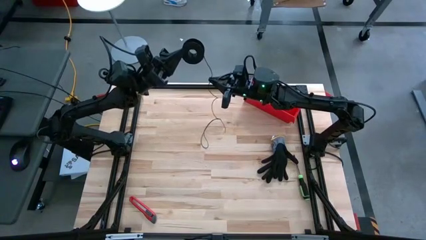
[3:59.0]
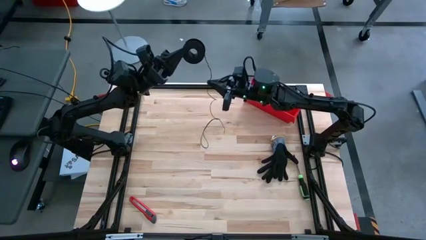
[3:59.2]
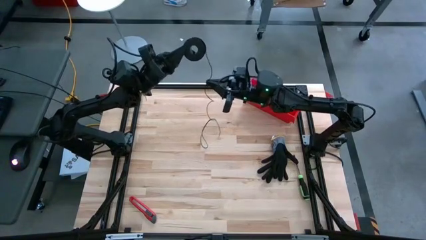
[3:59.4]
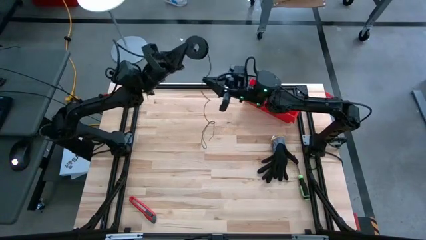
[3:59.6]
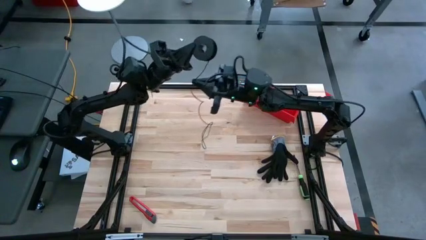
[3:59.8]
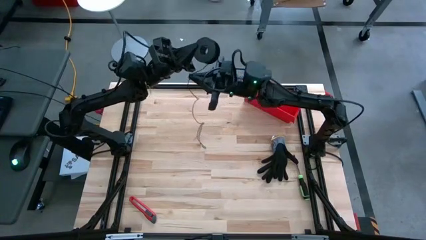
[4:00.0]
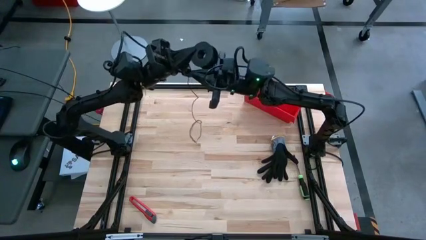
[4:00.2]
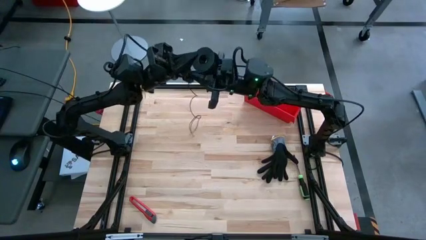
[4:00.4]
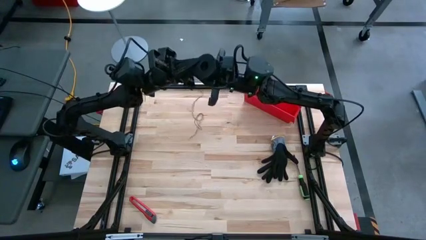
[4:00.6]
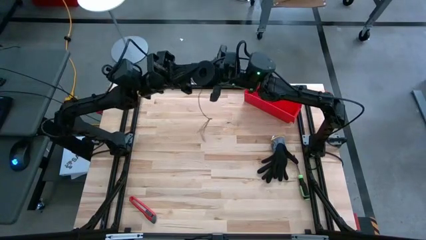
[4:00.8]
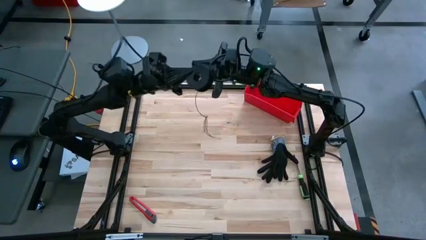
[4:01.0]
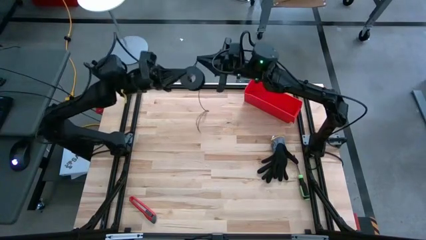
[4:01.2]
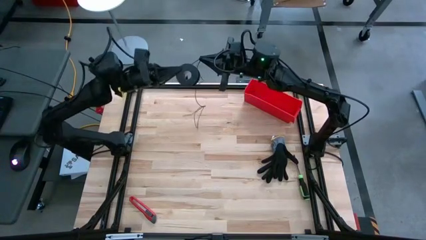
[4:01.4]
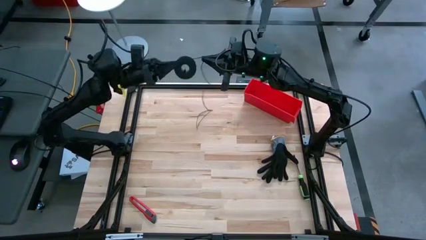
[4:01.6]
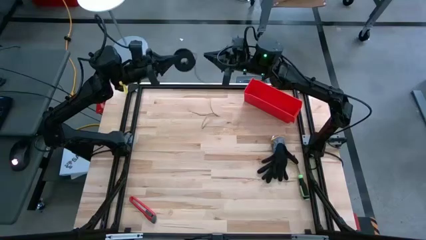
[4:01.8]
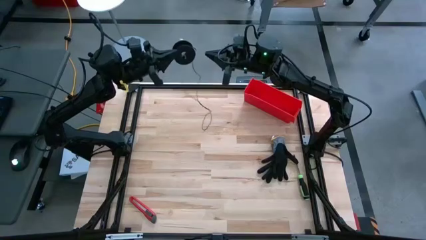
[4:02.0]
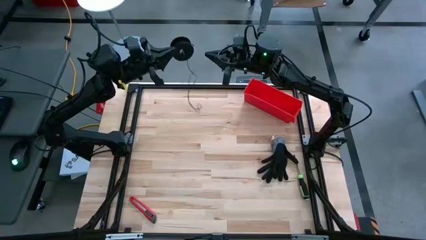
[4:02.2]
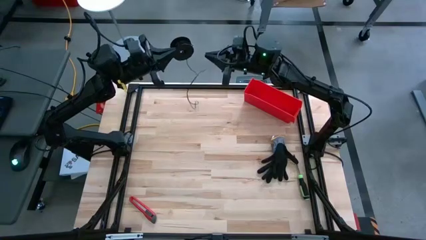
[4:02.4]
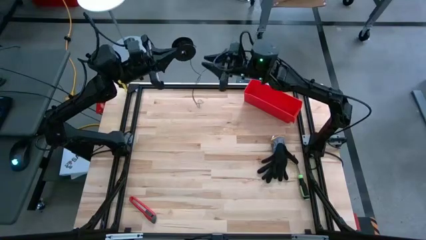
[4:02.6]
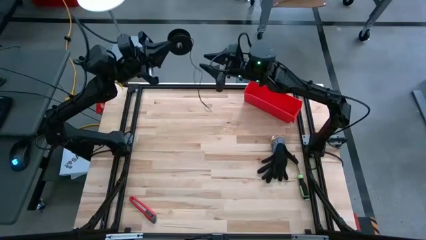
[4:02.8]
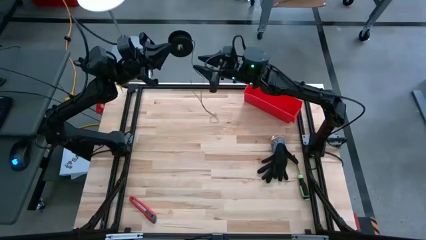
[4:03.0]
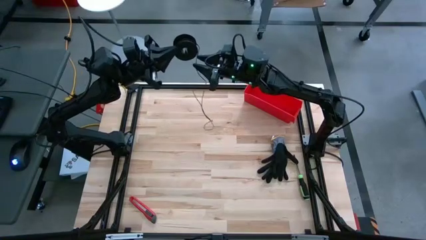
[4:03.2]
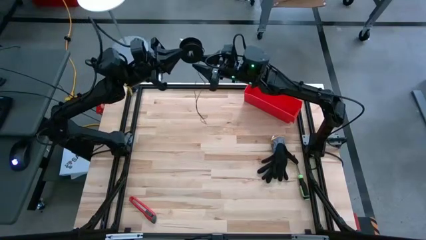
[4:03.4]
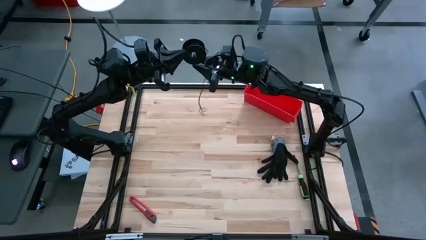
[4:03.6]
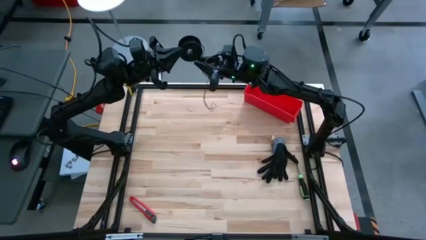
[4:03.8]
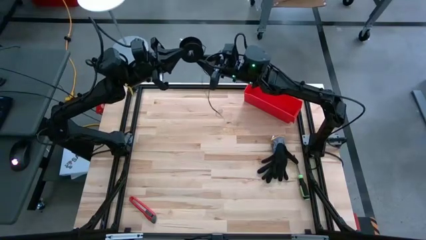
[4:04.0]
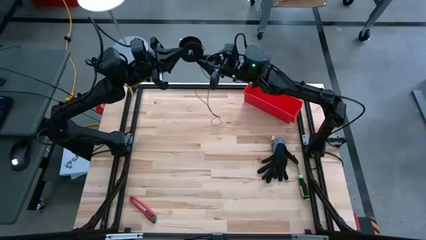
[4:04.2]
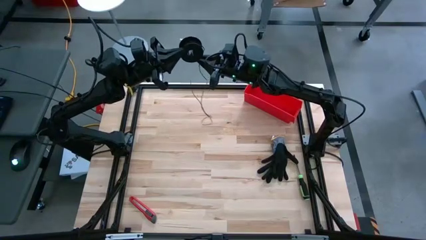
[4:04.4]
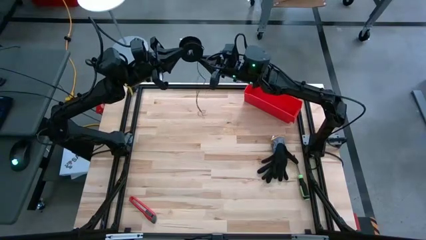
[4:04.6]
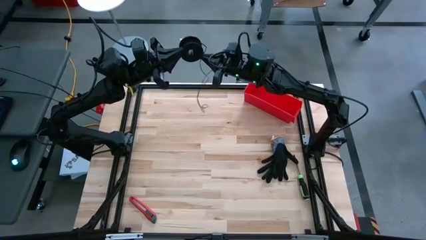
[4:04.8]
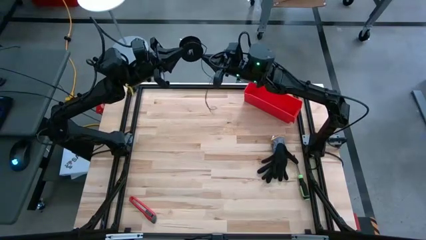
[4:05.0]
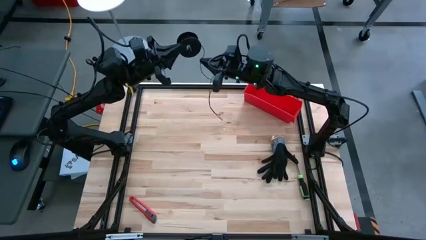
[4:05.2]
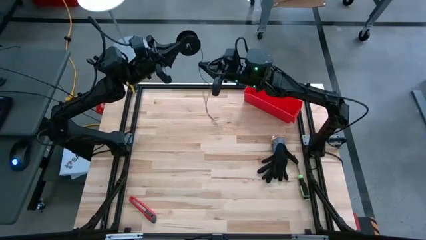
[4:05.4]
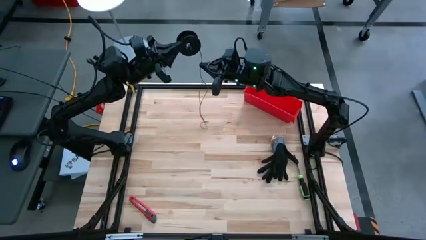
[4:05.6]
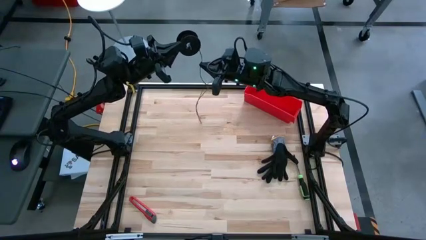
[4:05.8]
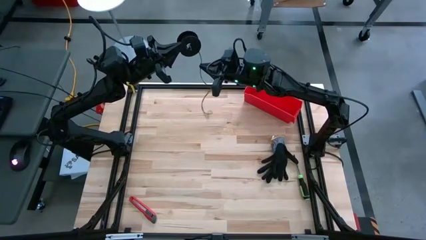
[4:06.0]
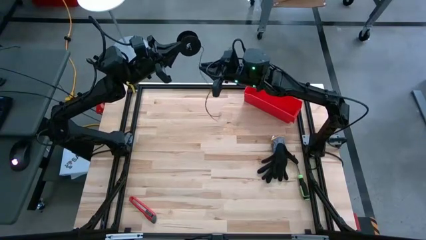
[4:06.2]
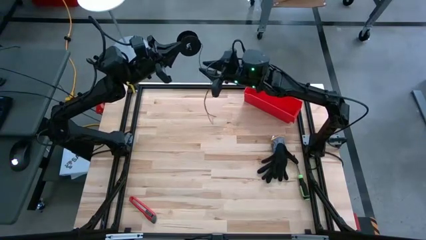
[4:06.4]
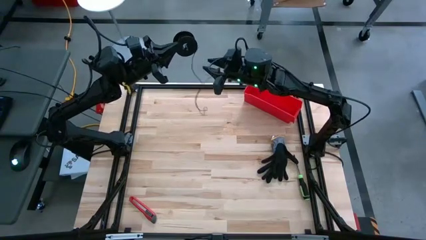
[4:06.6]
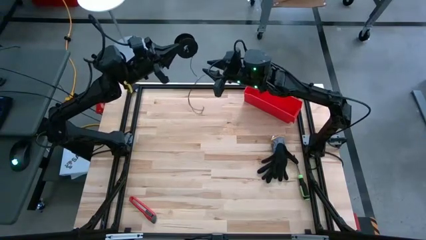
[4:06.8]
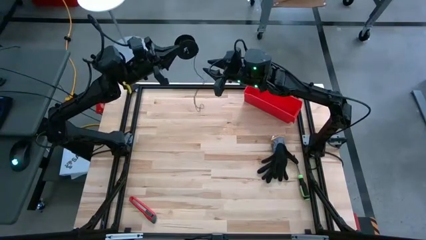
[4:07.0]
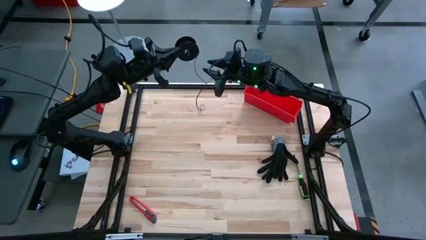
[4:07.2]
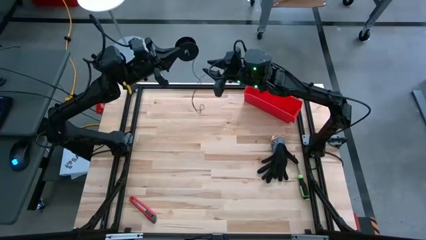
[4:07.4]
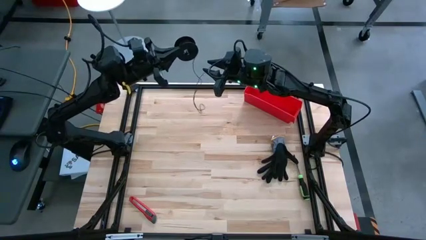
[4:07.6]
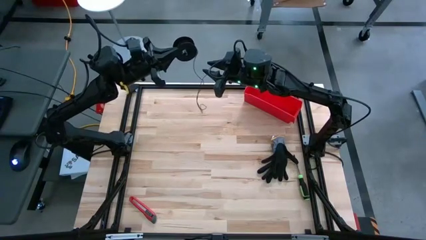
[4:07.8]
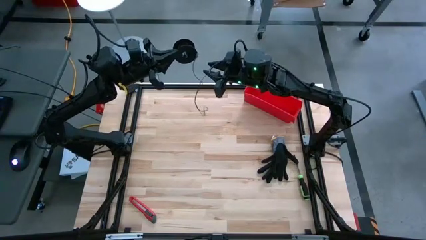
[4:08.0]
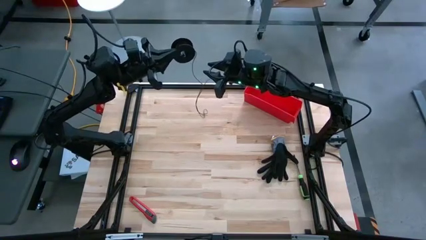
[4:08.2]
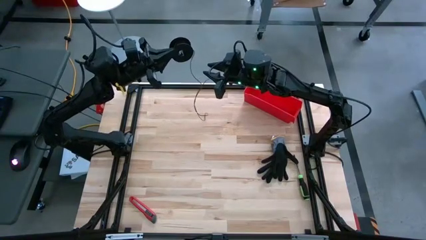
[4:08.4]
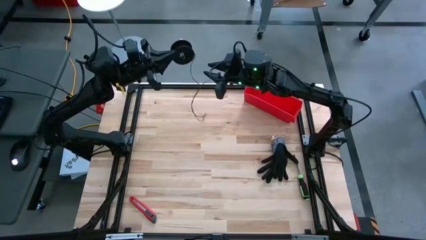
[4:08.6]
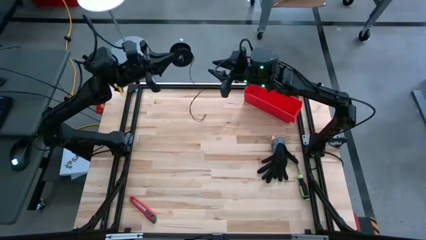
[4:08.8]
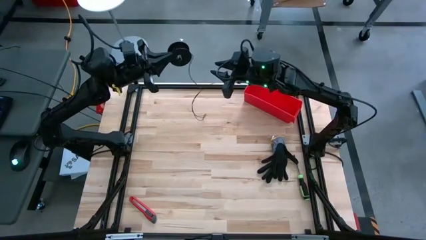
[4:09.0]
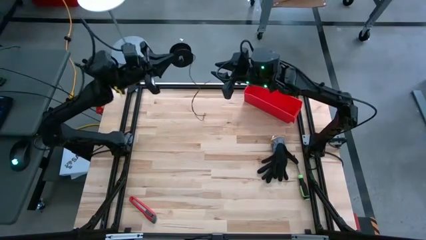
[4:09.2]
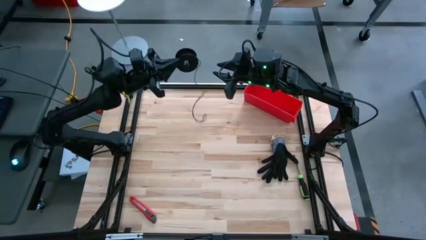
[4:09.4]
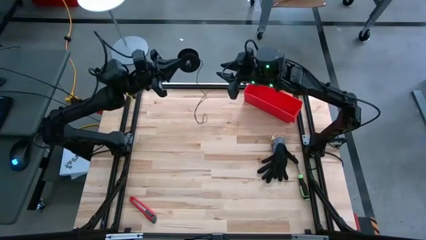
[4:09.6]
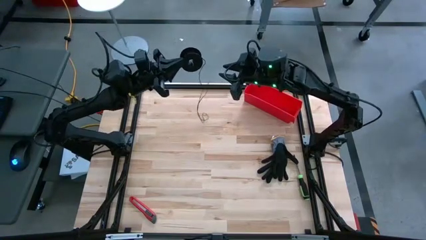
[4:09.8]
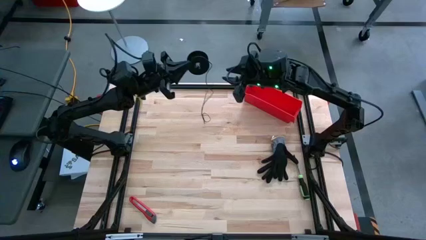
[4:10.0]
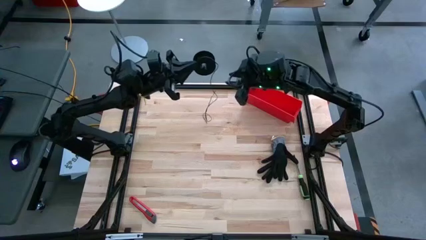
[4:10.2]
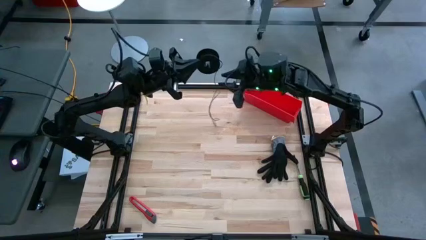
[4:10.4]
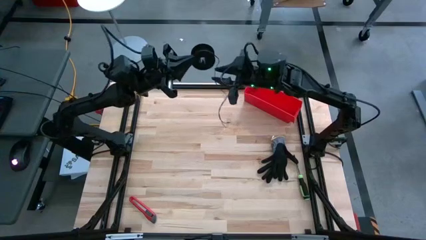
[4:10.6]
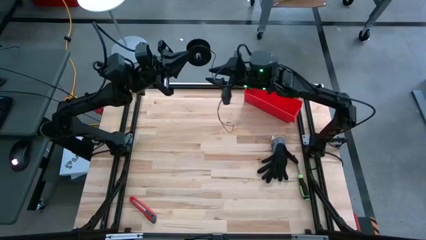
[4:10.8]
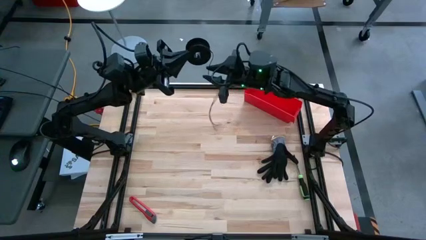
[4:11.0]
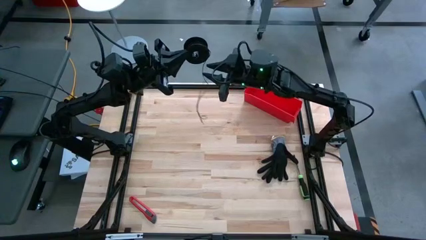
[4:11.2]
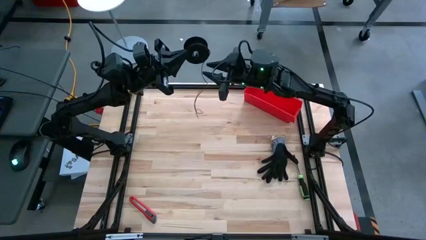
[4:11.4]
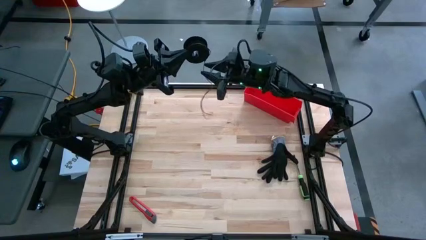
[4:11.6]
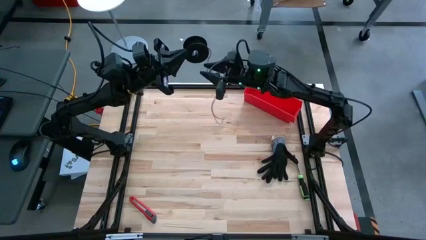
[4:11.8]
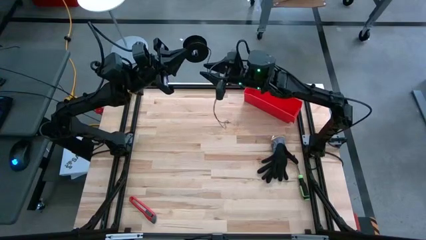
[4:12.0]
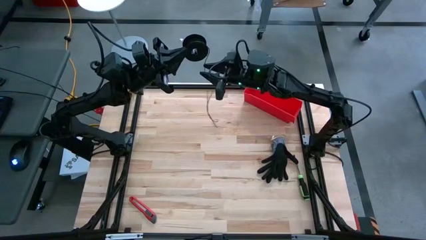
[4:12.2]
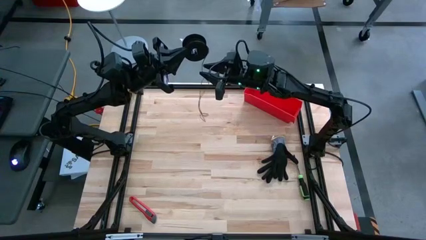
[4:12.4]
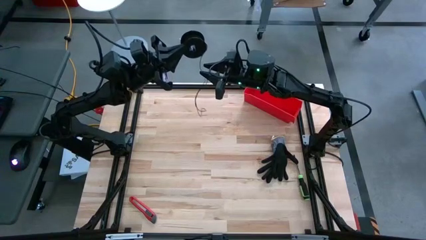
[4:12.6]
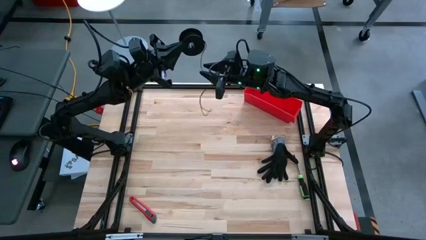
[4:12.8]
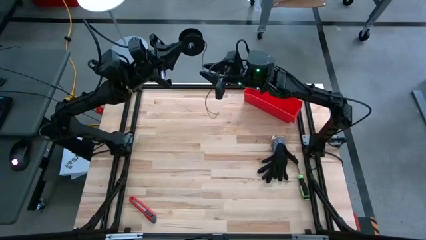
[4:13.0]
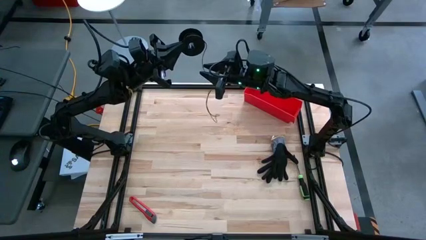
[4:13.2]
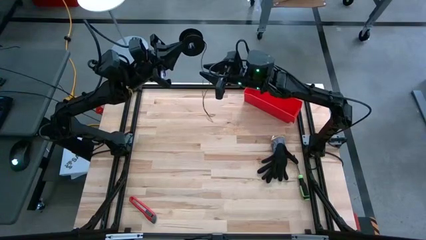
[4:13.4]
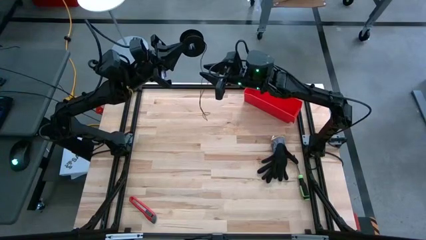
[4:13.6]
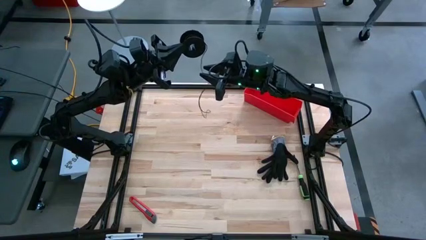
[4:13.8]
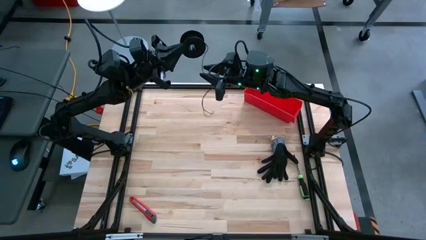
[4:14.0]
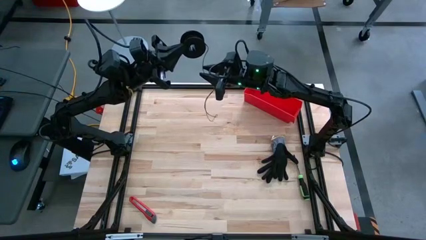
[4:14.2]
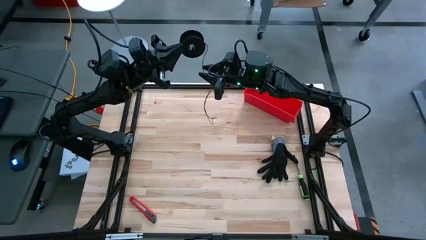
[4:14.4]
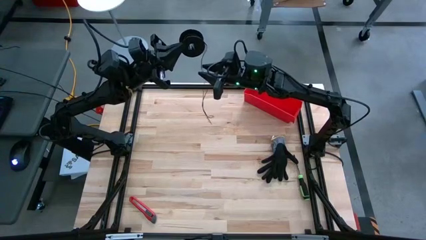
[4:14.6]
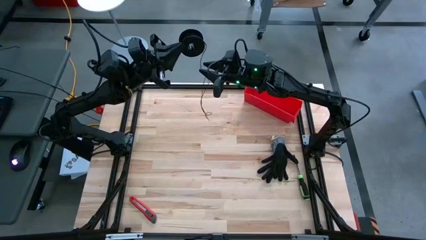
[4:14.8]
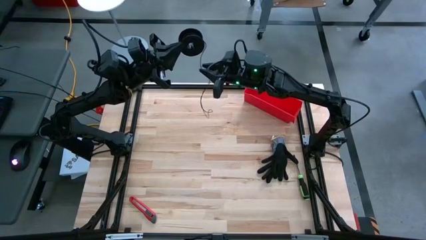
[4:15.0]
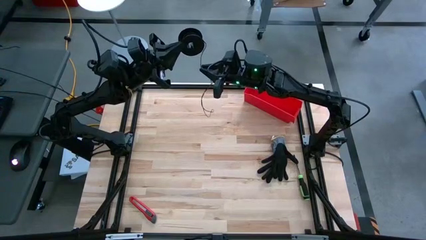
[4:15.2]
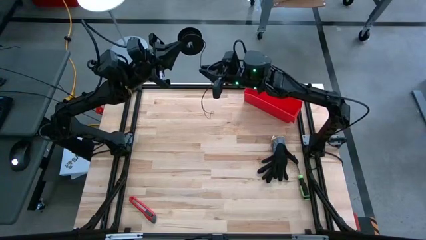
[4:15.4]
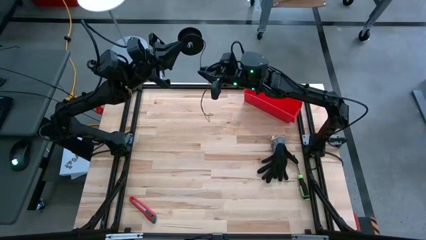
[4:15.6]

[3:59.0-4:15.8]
Task: Coil cords
Coil the black wire on the spool
